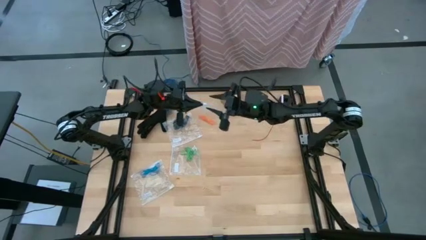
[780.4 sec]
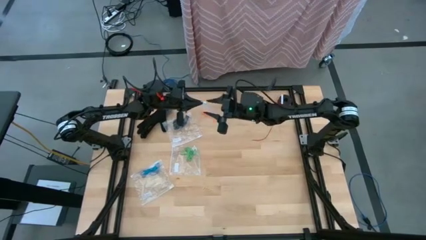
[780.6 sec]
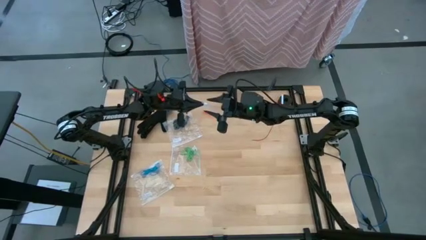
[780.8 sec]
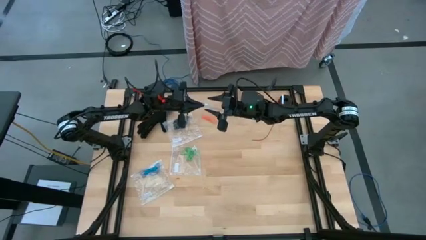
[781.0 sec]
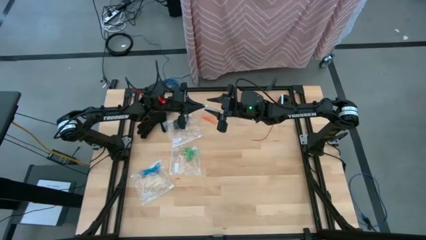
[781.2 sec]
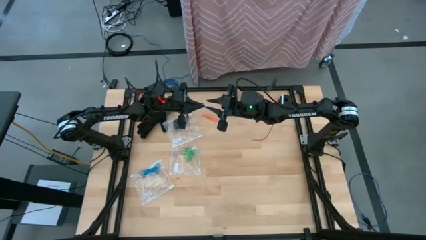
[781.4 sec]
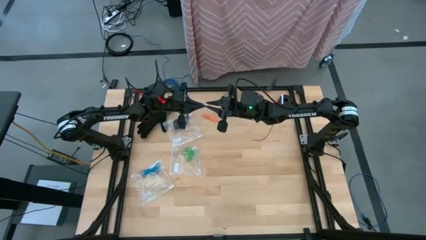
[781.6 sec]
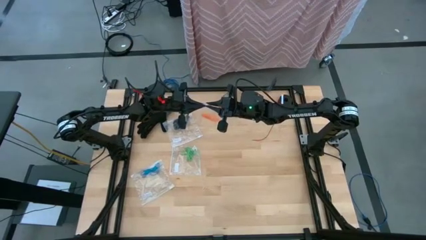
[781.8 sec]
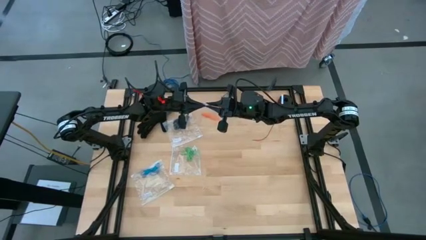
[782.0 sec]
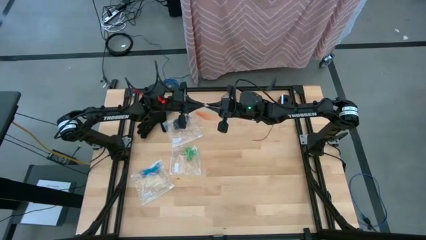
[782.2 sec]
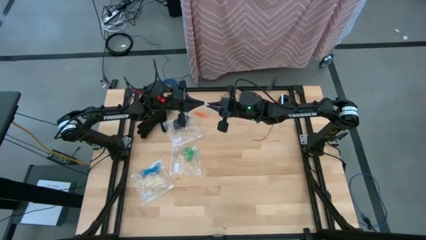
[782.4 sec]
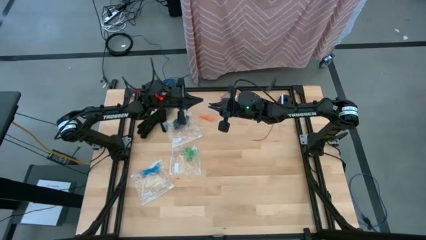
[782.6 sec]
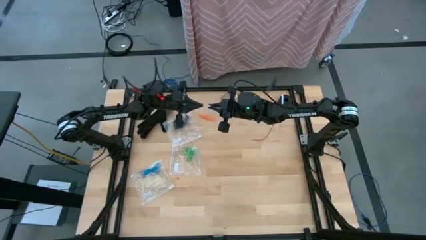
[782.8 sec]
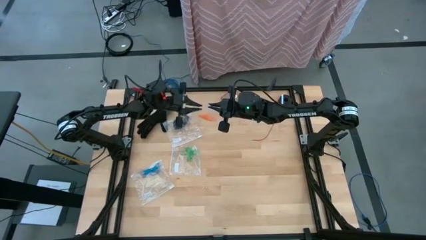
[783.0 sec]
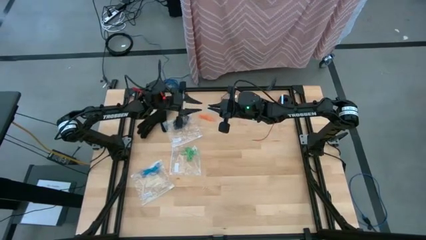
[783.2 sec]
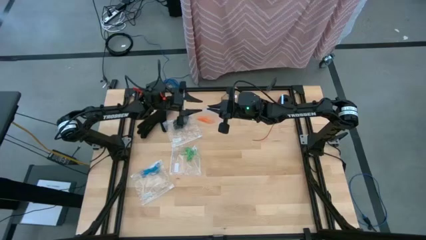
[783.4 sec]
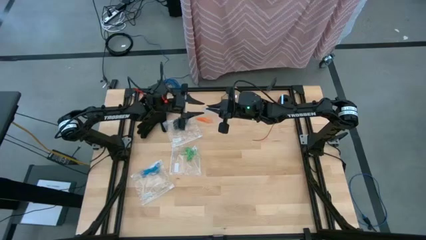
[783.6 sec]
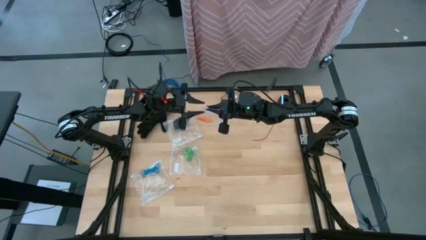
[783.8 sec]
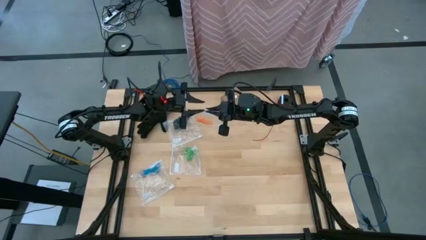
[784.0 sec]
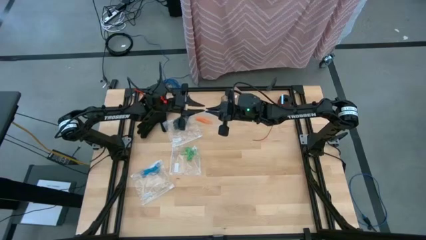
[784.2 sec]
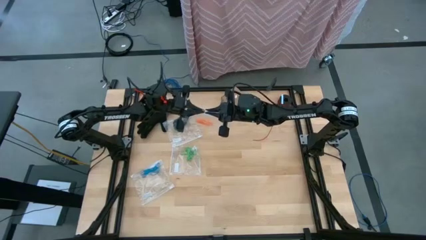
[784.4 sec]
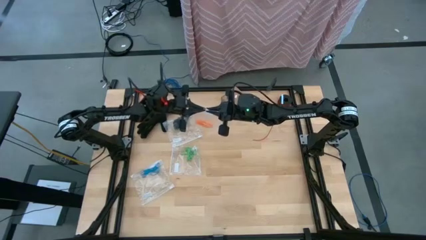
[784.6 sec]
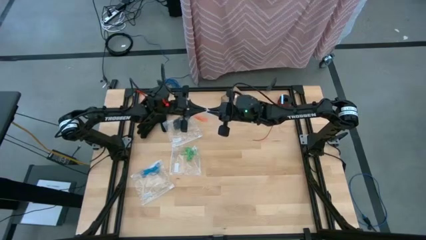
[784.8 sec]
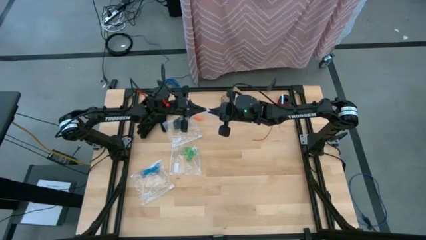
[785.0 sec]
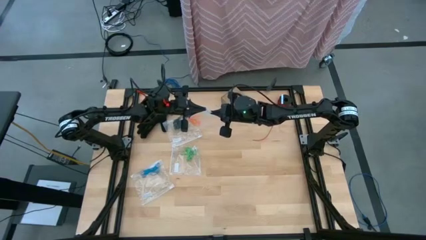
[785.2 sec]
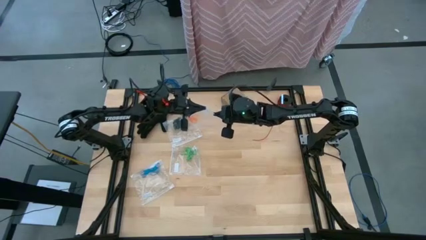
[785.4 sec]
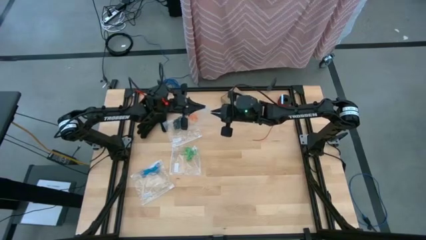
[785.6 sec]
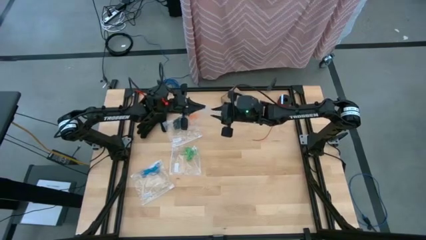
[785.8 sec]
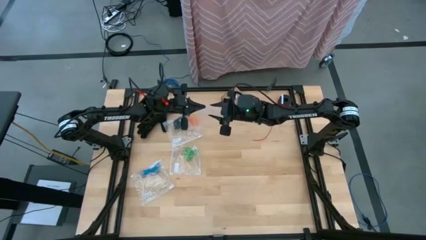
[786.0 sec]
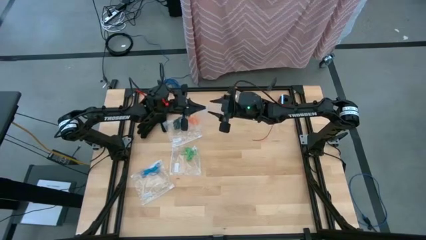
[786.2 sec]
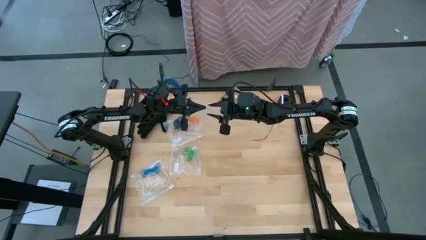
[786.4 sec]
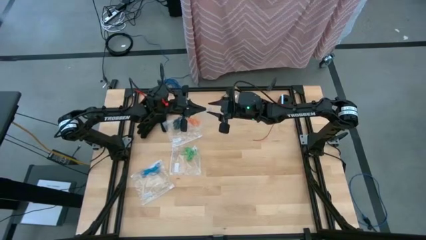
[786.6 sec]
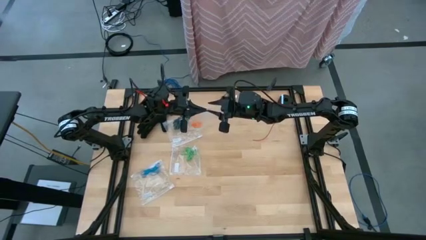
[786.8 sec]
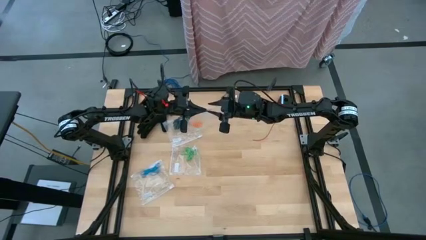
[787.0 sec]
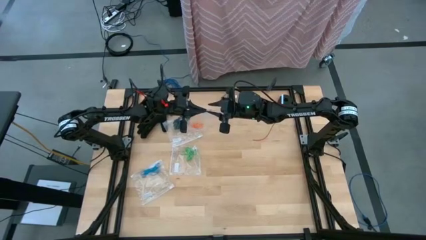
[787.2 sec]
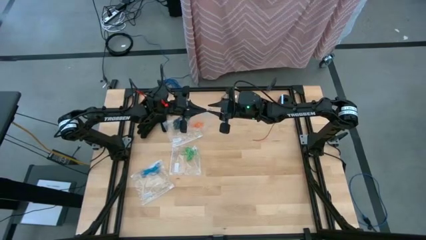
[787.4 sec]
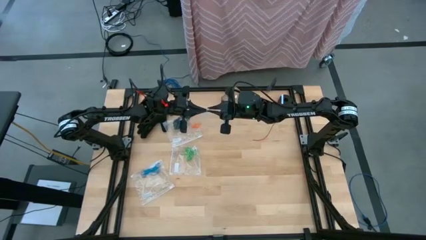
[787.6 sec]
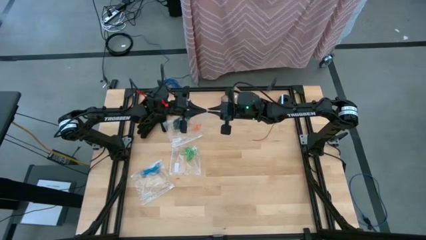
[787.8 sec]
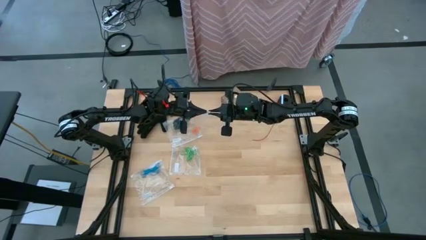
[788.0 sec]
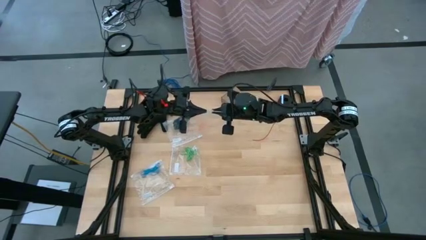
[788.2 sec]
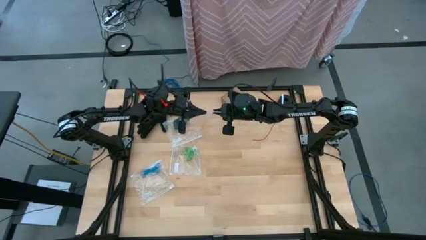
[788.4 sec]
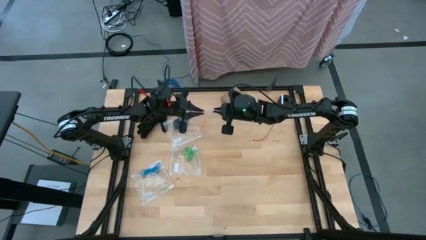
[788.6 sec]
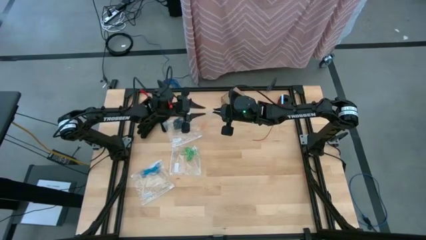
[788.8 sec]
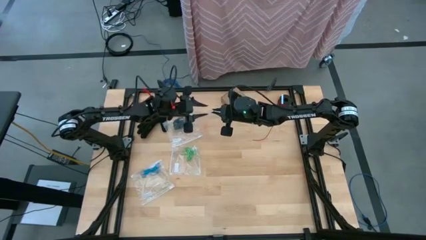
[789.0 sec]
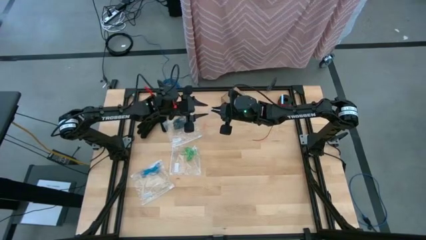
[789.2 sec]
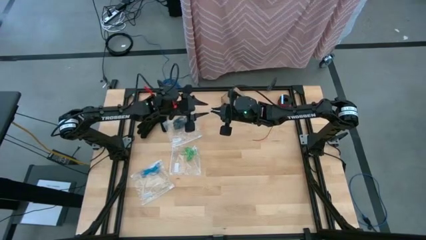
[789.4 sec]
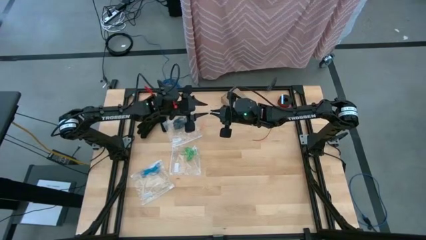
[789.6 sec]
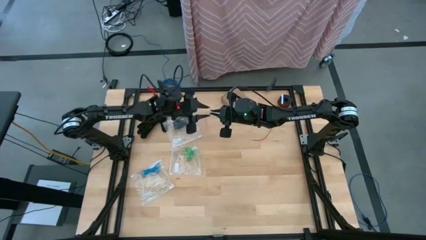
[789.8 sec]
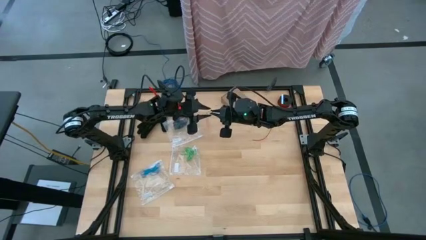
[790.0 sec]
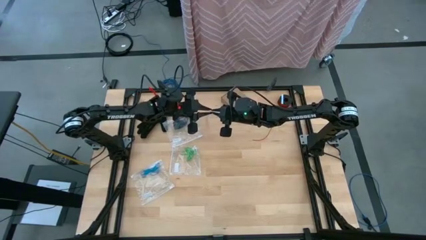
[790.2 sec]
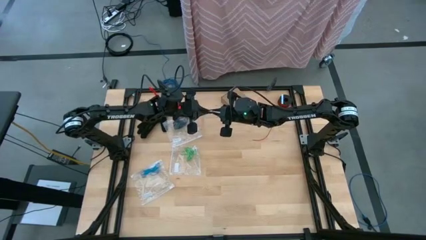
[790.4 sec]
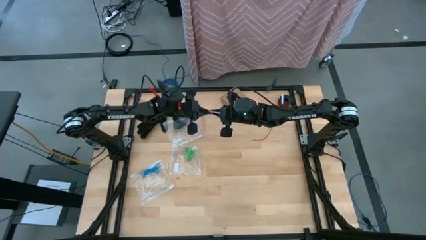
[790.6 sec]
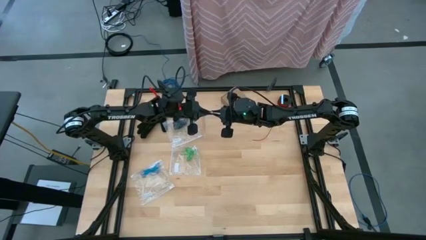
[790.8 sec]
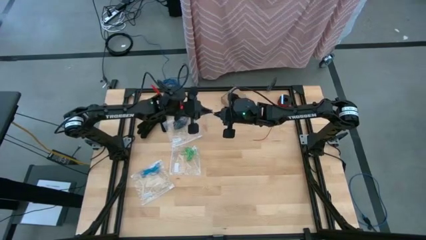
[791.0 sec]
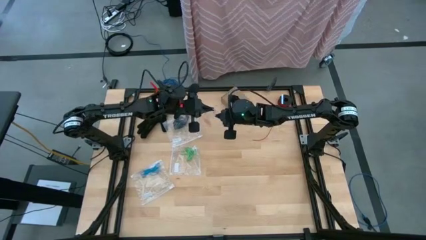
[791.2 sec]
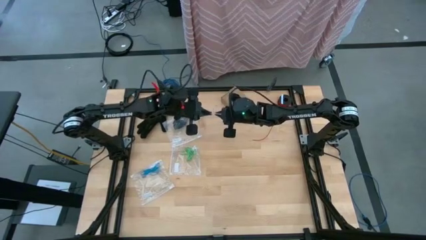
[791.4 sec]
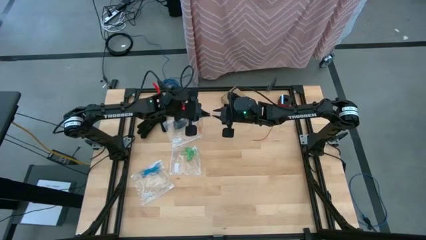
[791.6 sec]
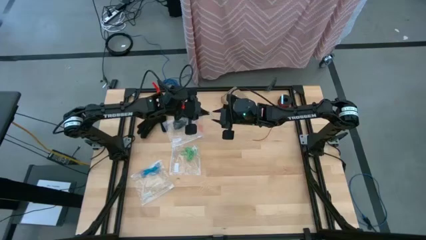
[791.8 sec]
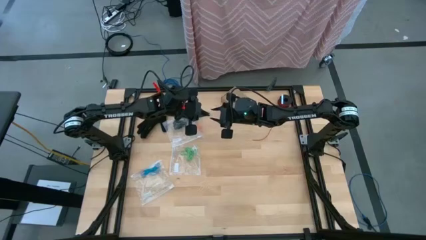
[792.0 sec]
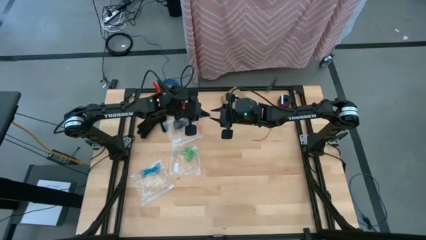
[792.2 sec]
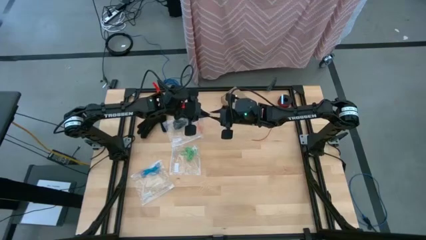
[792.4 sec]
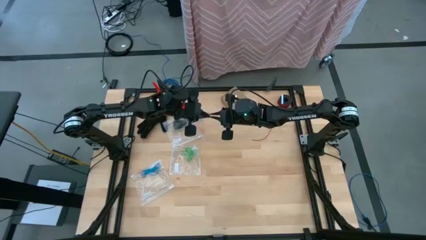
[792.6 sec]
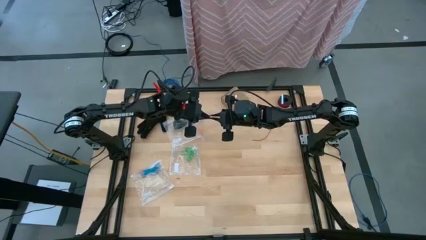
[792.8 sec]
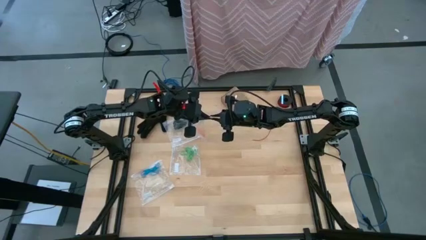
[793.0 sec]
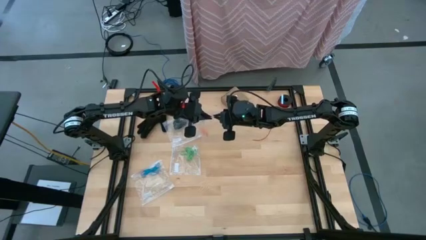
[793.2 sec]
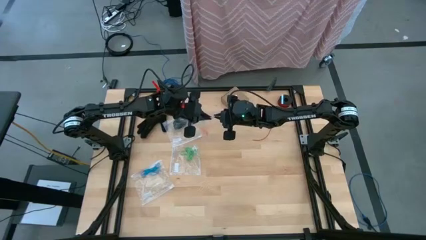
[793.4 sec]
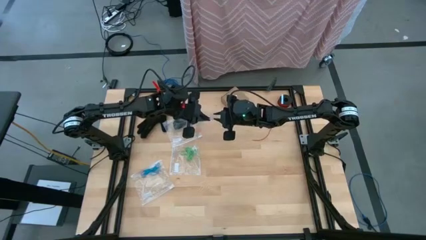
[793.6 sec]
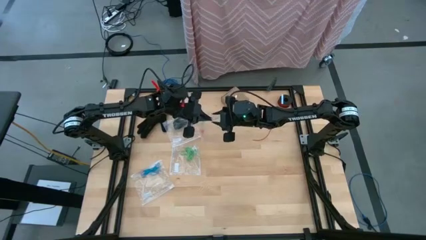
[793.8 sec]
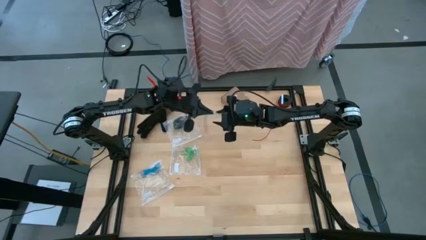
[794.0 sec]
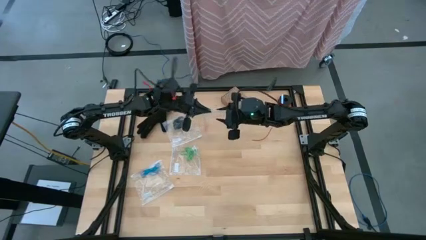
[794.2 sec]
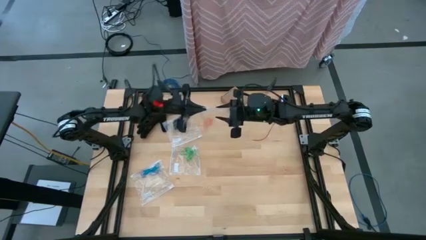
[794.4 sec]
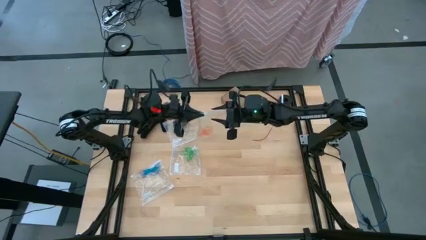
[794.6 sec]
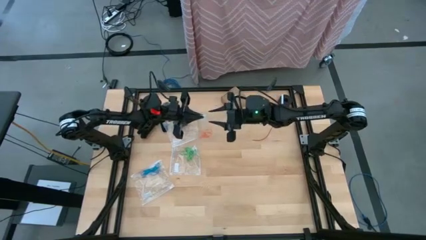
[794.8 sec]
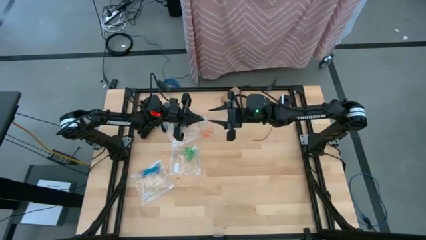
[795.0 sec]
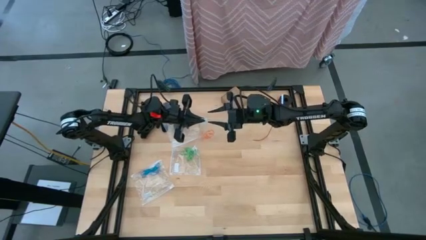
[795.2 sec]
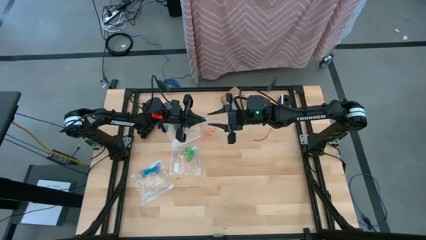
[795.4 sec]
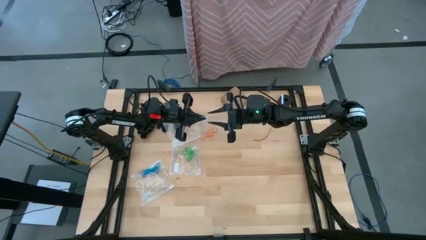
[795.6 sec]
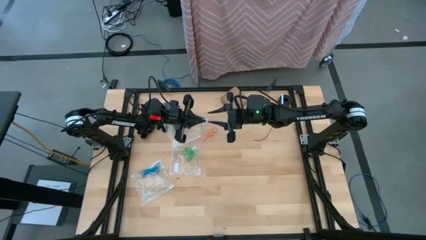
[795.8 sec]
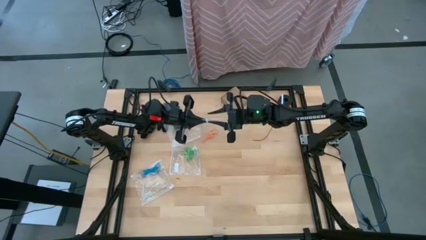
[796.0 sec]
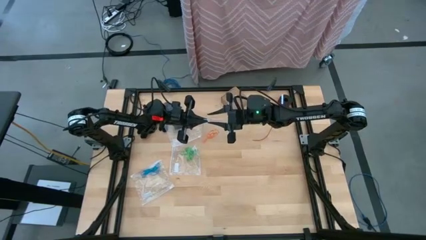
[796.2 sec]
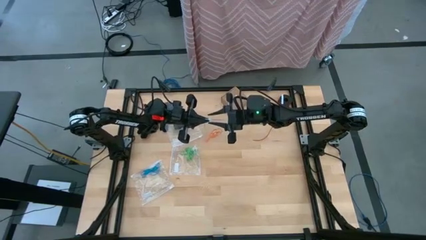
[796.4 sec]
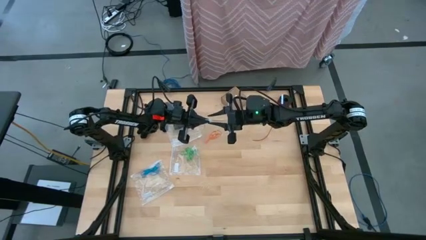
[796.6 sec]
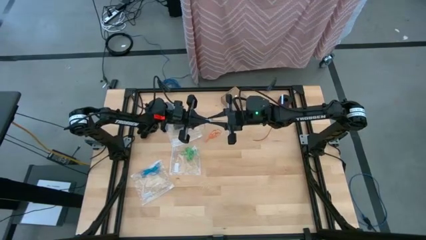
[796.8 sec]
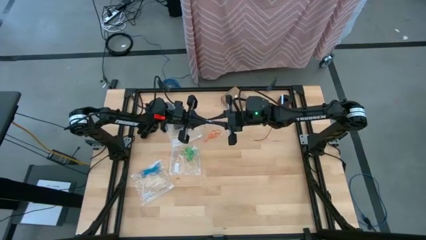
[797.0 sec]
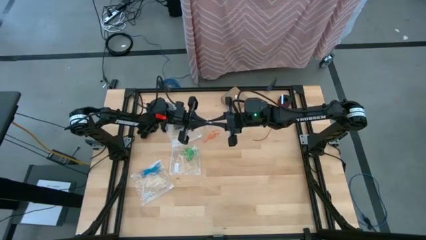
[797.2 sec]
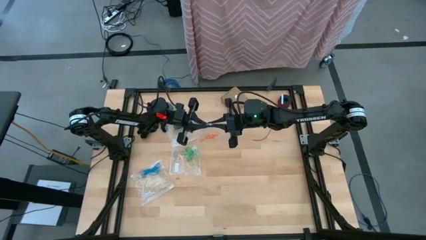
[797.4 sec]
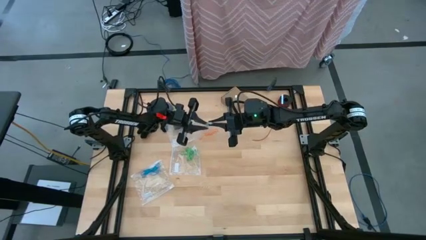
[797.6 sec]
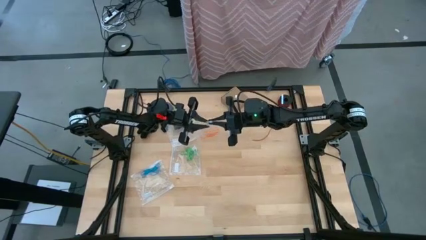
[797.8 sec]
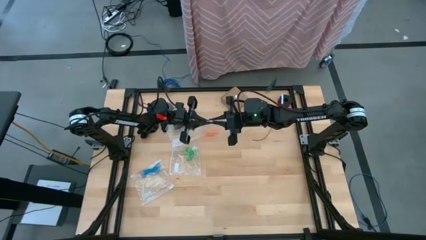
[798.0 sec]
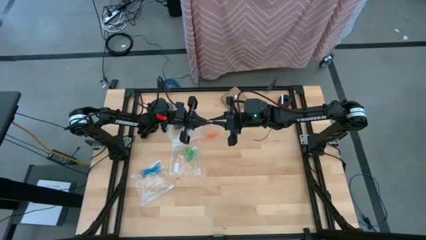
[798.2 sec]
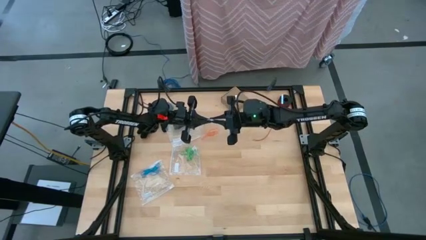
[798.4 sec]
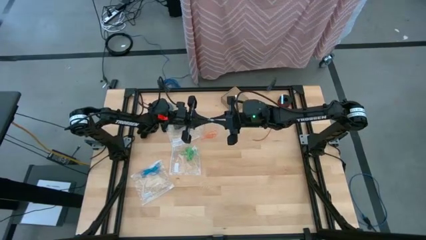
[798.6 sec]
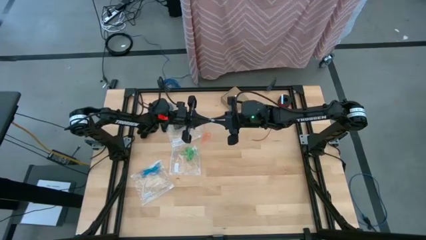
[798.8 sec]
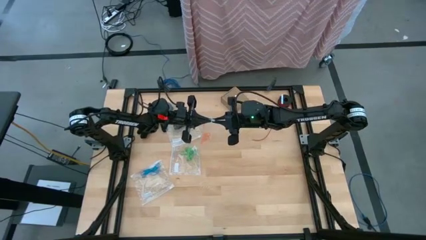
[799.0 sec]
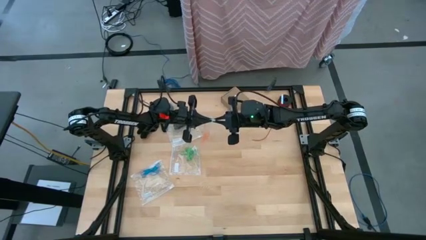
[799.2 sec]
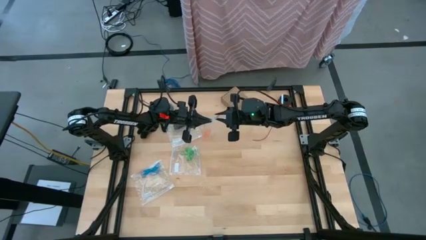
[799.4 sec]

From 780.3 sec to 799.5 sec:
Task: Sort rubber bands
Close the transparent zip bag
